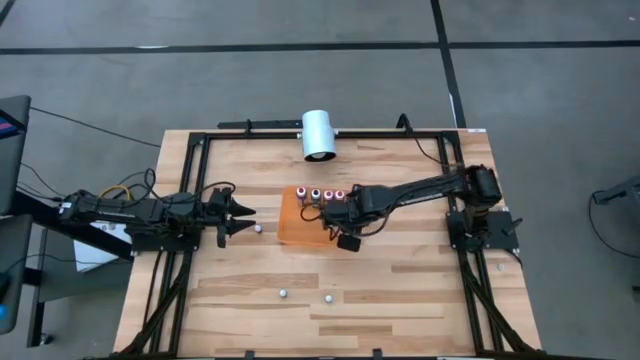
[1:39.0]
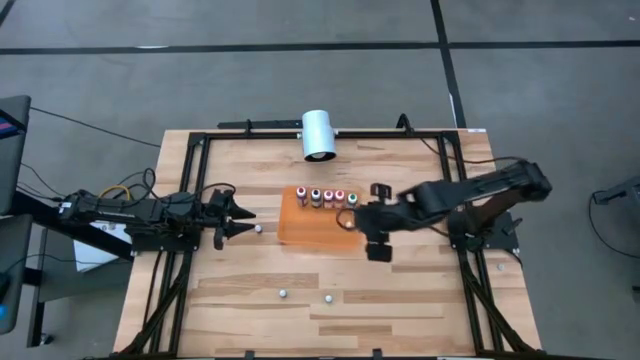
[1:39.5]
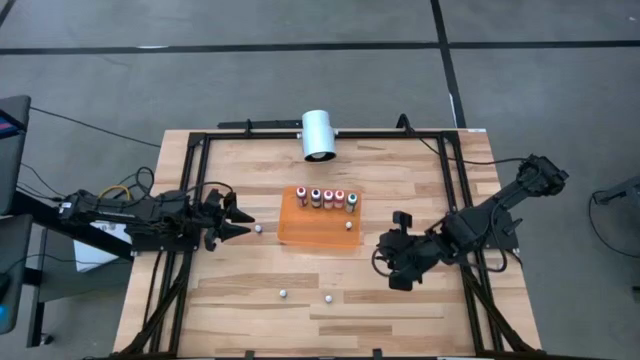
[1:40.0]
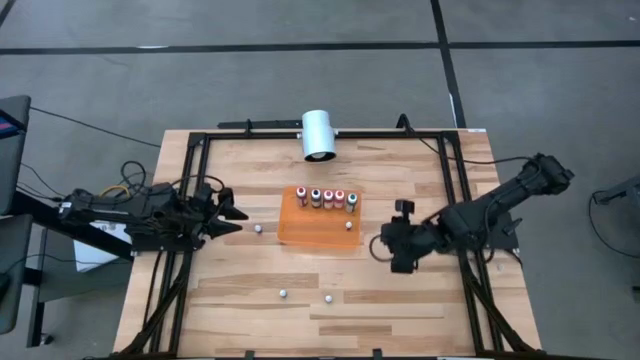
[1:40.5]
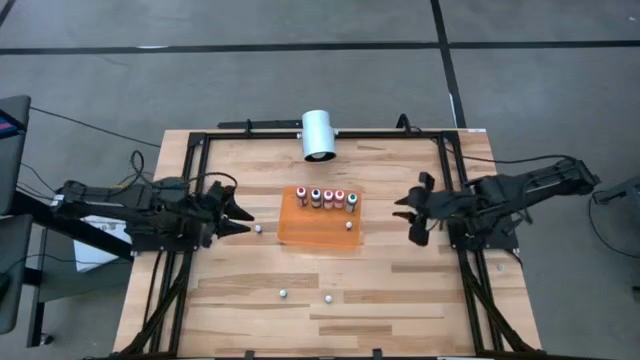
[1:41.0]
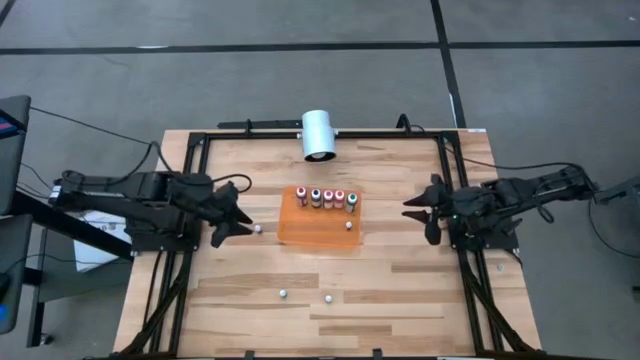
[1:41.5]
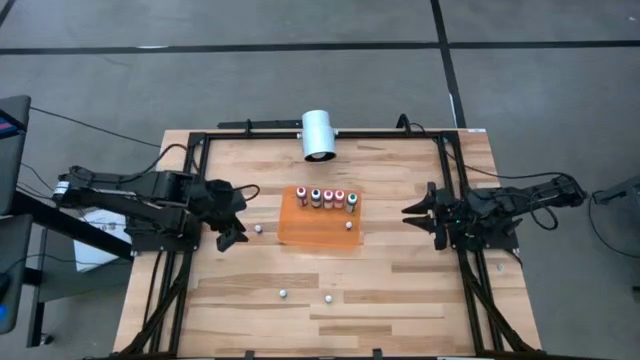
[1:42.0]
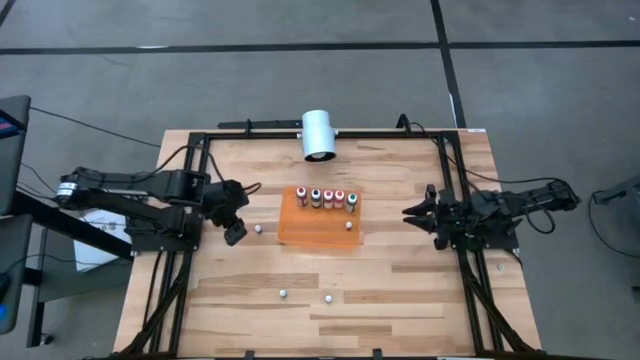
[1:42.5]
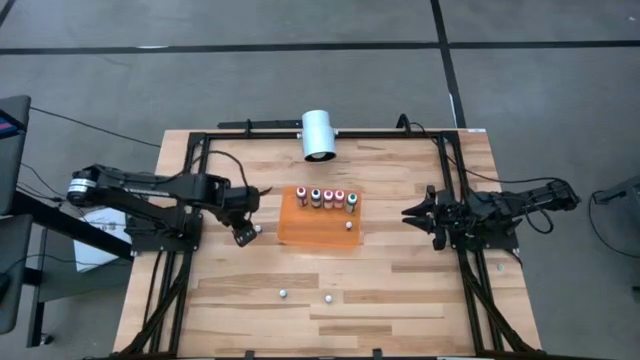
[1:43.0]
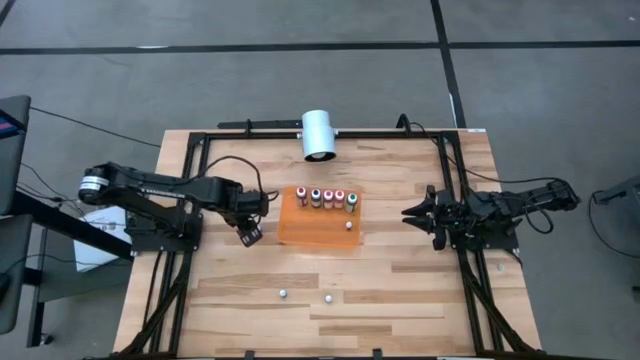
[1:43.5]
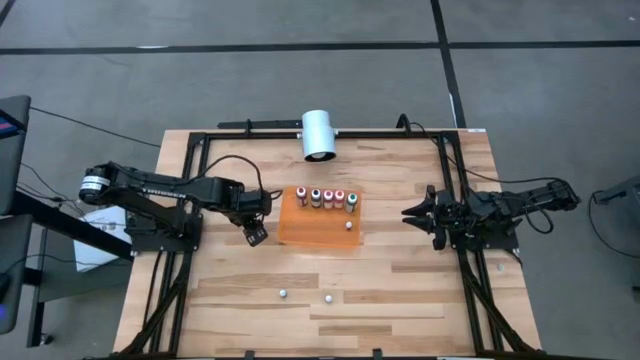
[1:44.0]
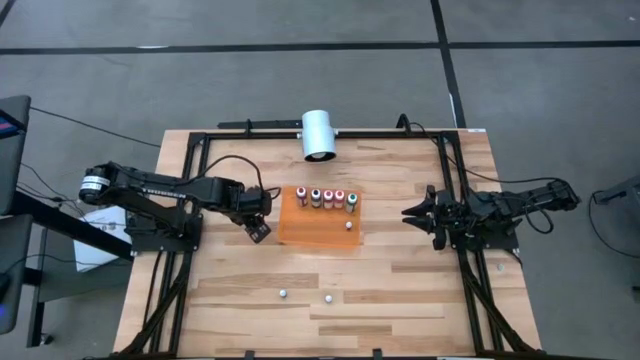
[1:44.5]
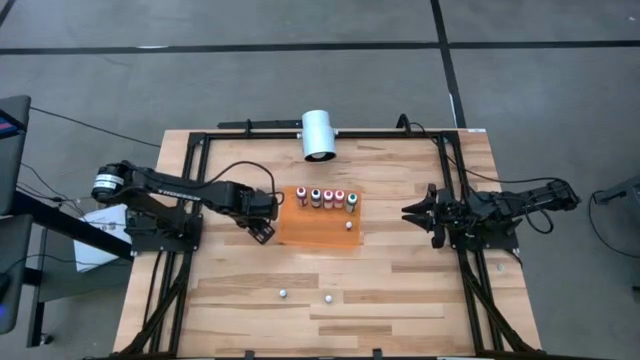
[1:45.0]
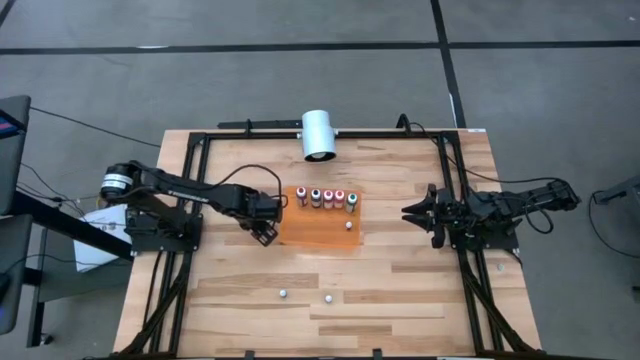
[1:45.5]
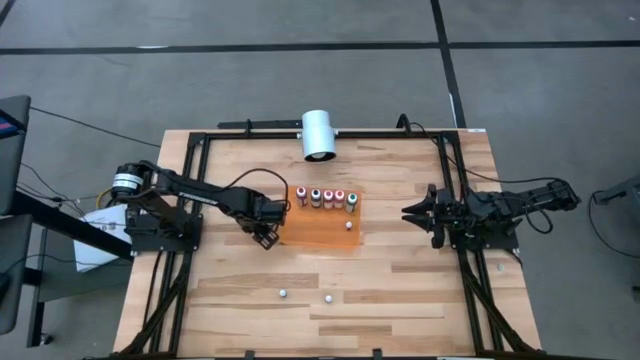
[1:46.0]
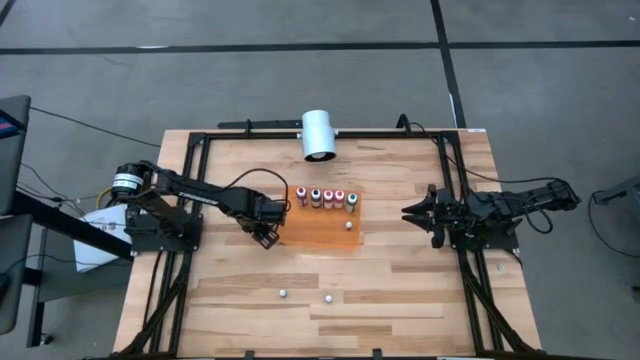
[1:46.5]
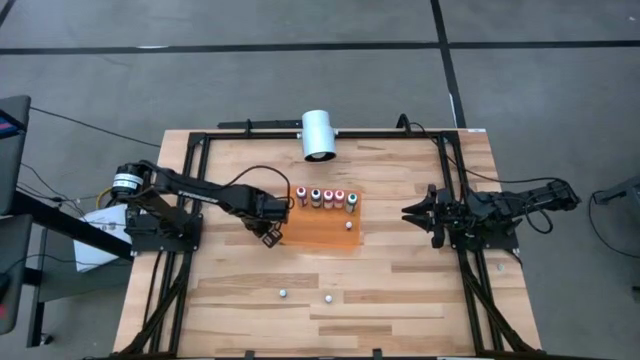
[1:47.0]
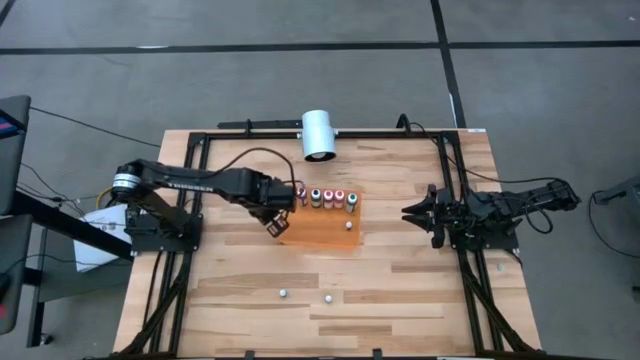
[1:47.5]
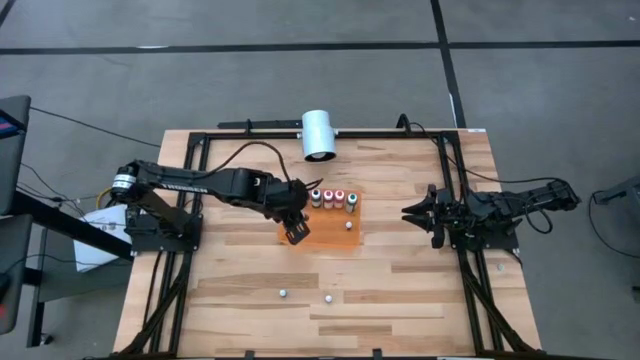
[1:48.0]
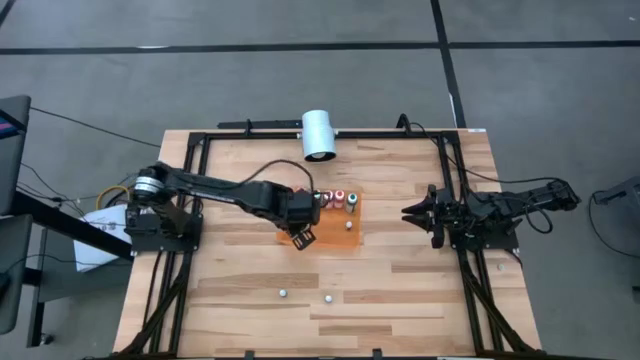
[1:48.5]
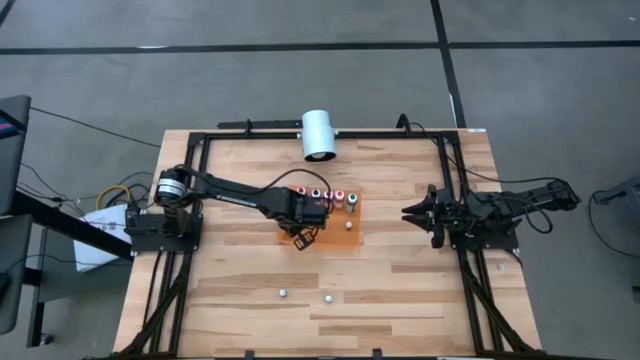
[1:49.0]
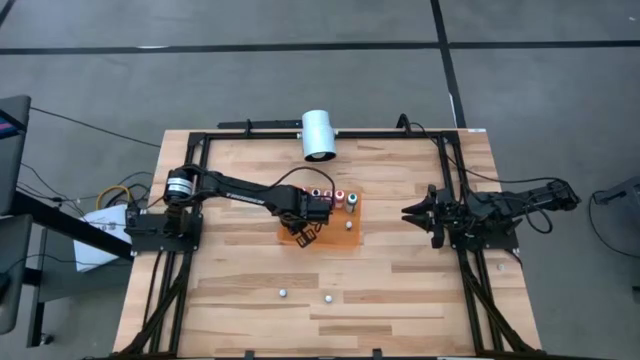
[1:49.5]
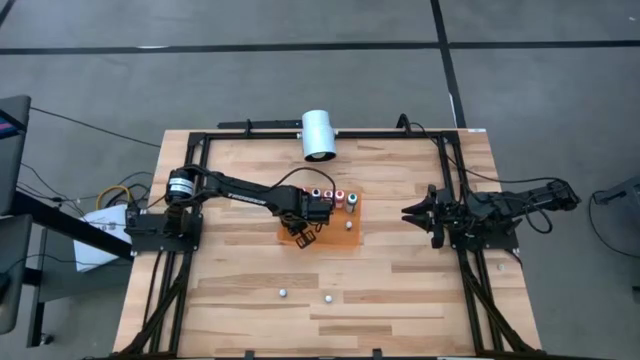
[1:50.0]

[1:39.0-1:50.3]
Task: Pick & Place food coloring
Put the small purple food coloring bottle into the orange bin

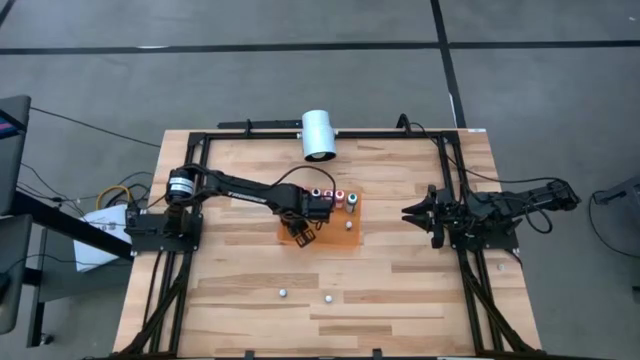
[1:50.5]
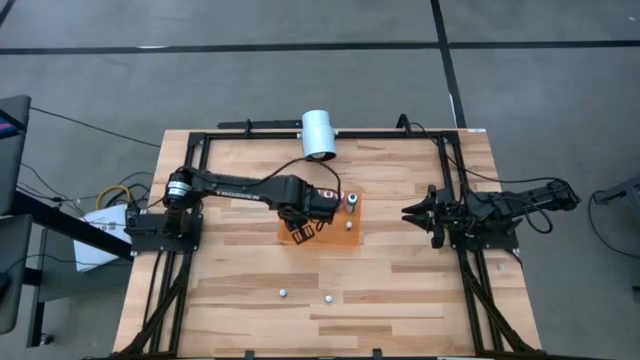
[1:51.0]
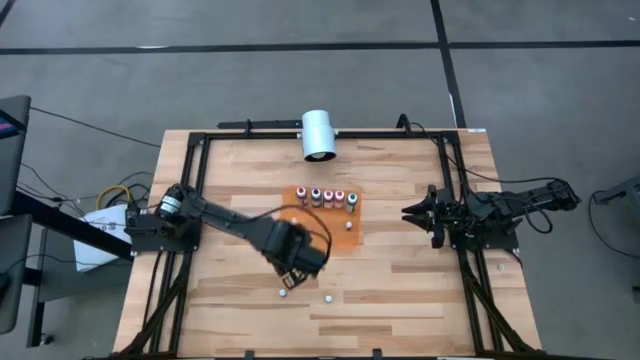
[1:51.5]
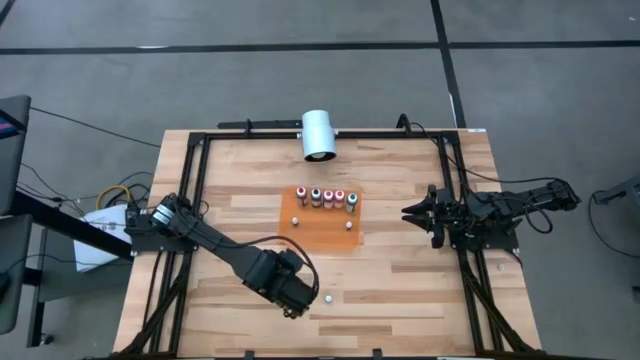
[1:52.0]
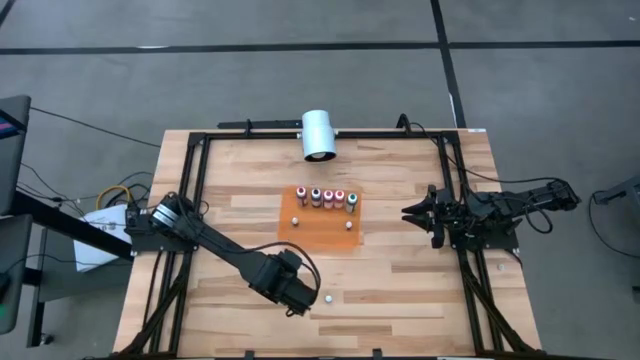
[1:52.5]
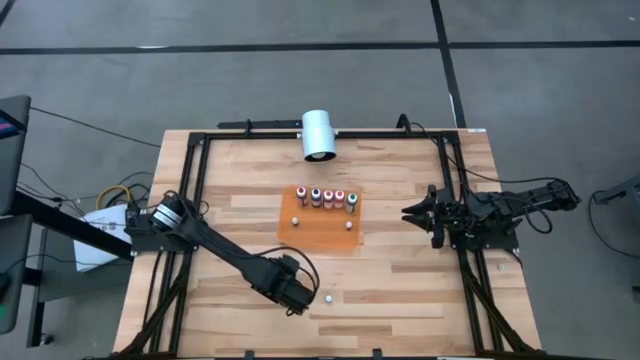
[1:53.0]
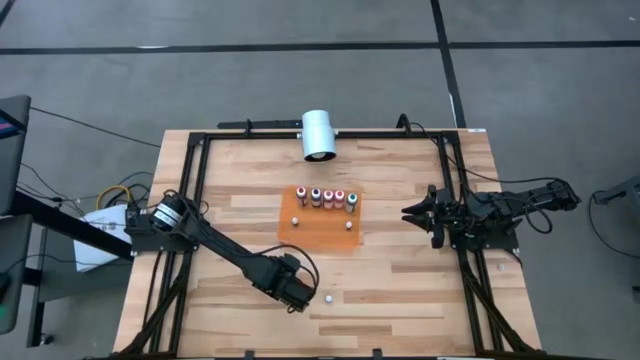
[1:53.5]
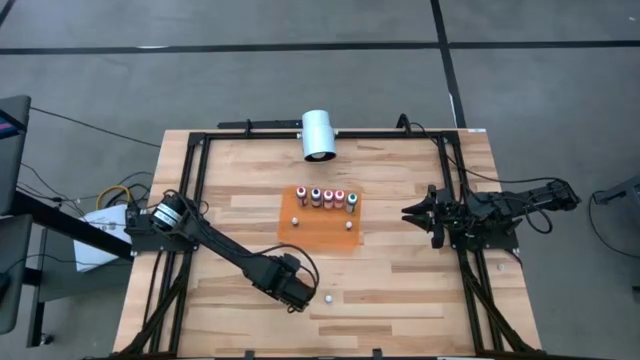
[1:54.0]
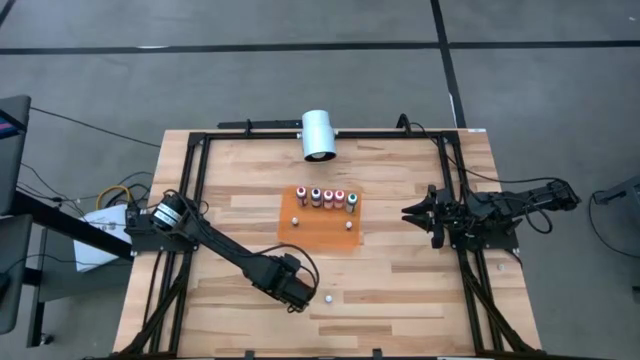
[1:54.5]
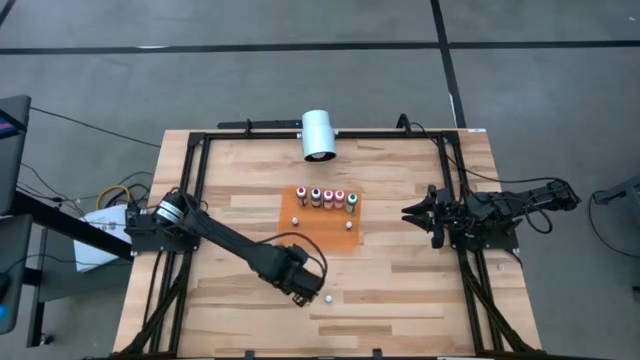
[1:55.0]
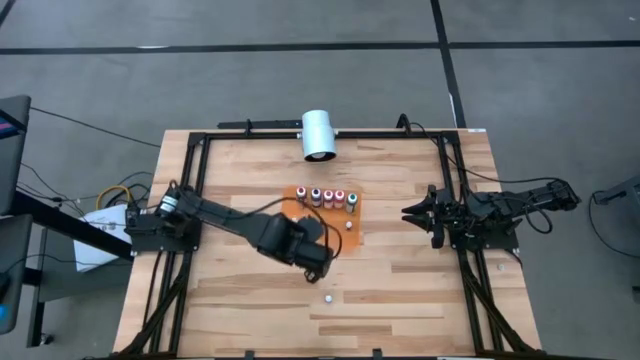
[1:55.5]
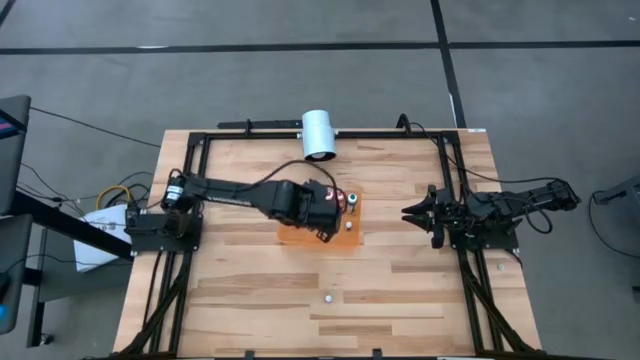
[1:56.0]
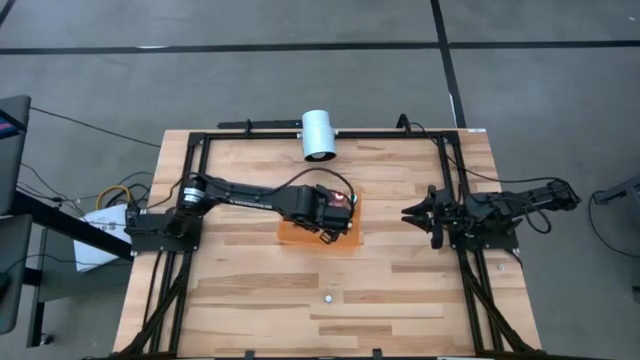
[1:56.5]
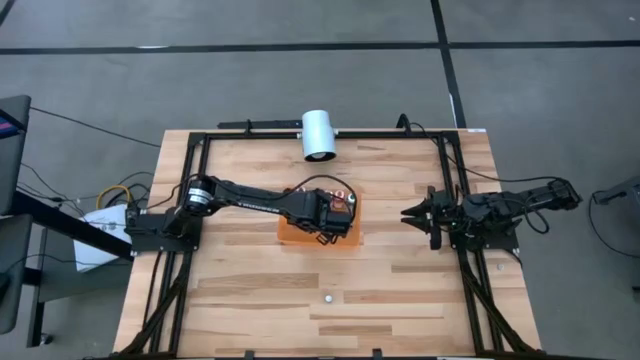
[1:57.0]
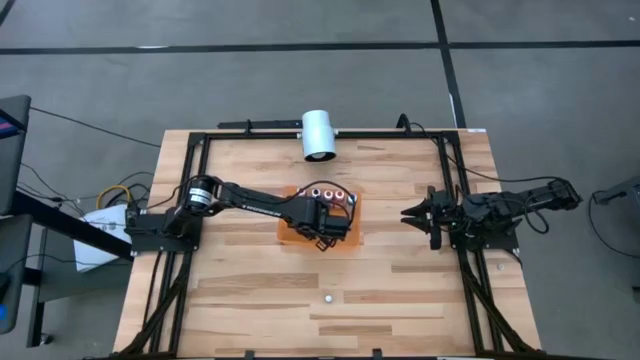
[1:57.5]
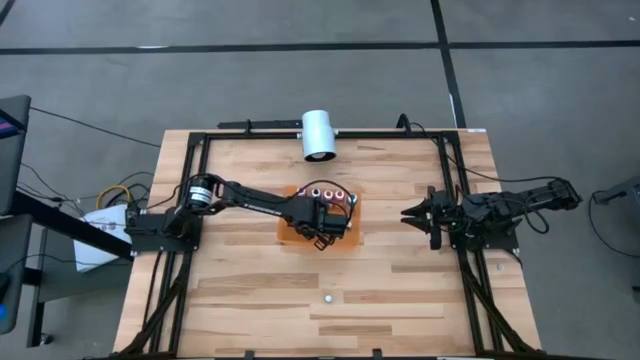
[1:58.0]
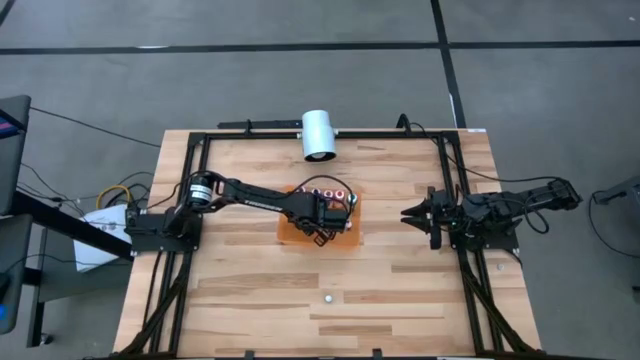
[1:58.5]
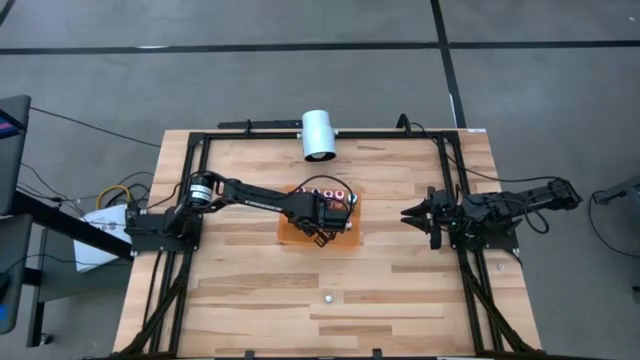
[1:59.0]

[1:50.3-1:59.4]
Put the small green food coloring bottle into the orange bin
